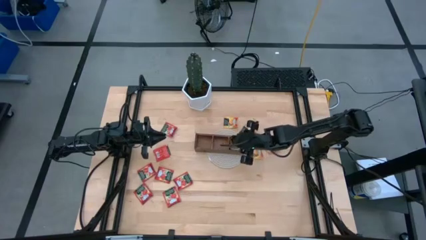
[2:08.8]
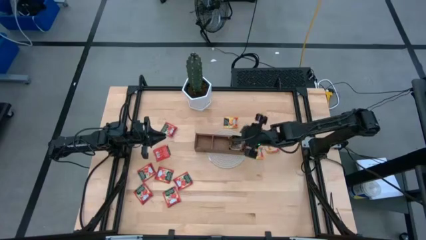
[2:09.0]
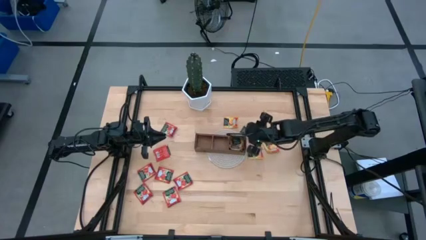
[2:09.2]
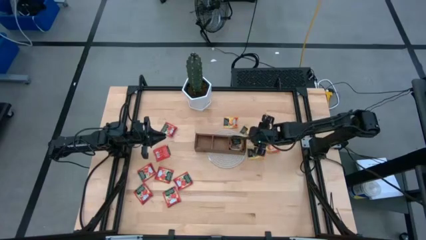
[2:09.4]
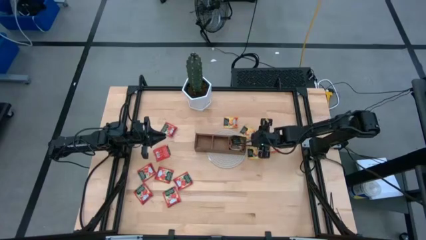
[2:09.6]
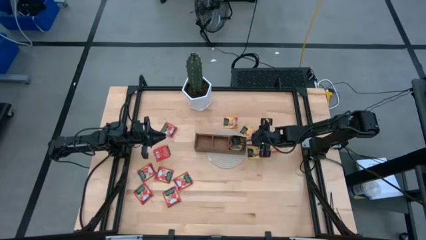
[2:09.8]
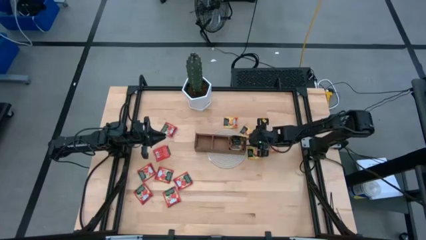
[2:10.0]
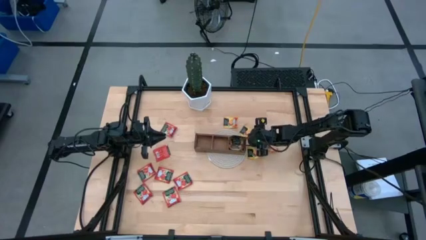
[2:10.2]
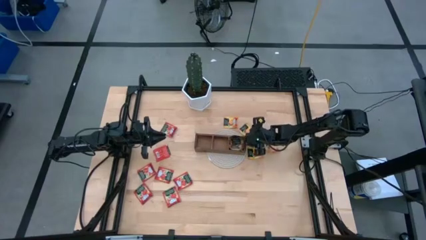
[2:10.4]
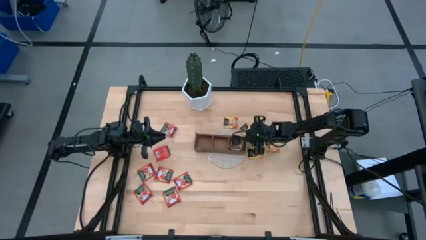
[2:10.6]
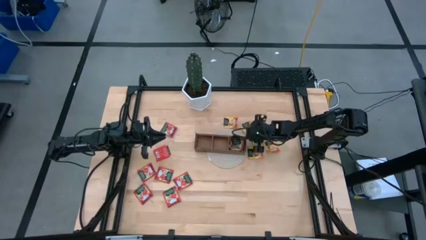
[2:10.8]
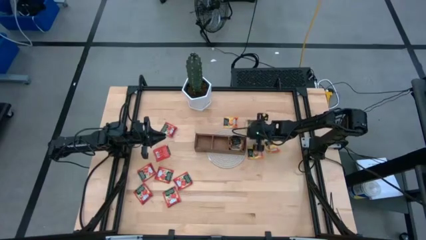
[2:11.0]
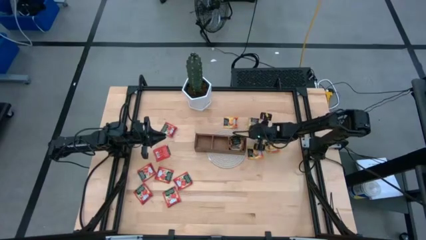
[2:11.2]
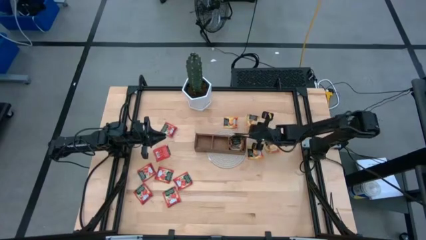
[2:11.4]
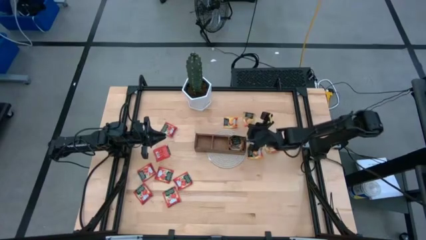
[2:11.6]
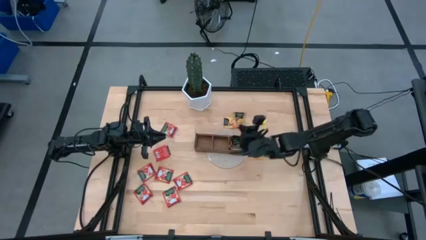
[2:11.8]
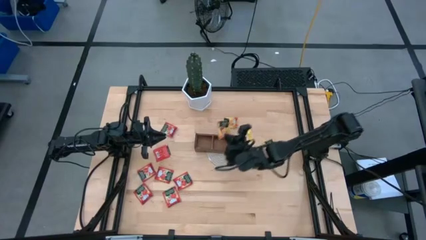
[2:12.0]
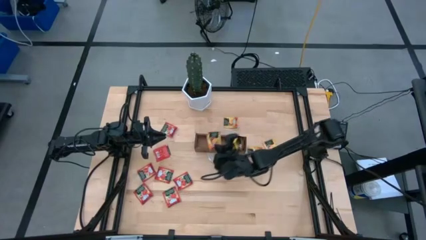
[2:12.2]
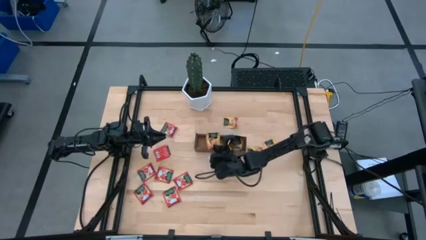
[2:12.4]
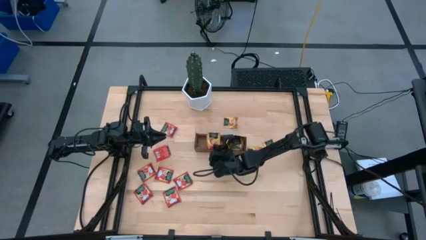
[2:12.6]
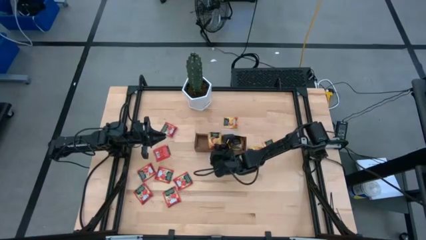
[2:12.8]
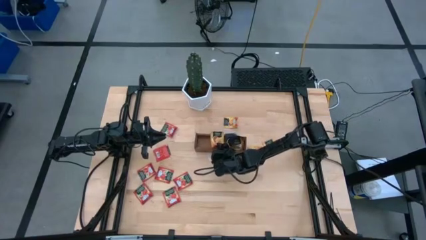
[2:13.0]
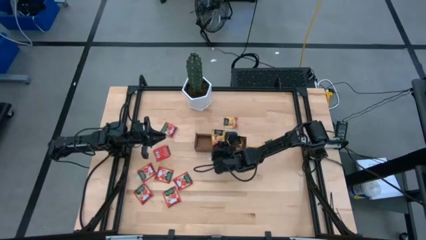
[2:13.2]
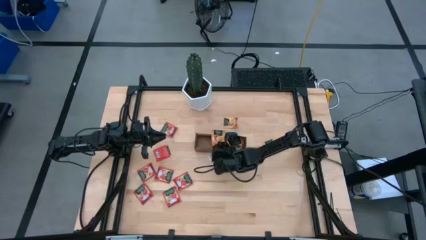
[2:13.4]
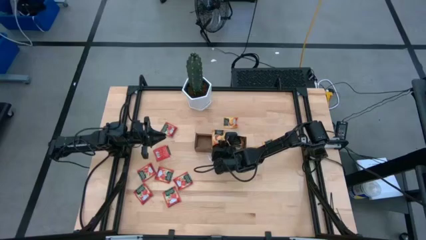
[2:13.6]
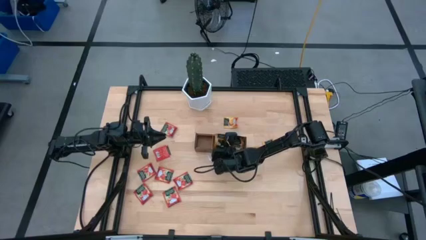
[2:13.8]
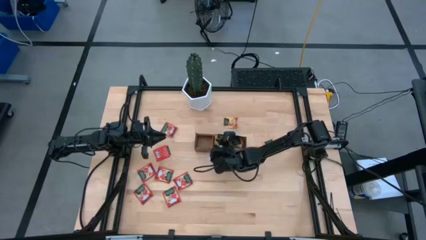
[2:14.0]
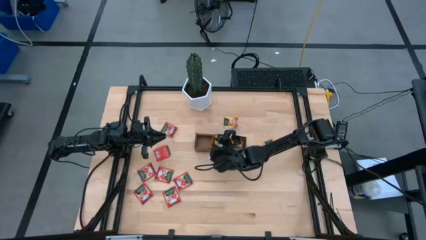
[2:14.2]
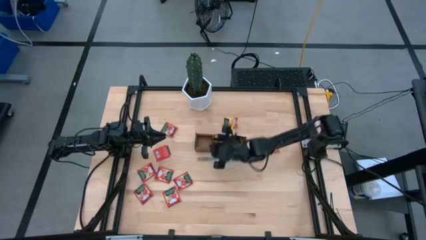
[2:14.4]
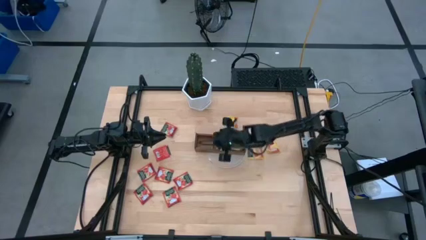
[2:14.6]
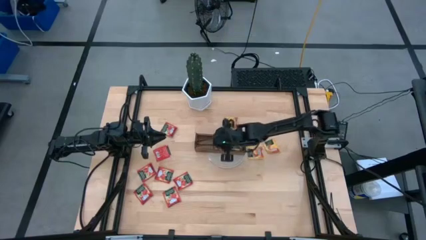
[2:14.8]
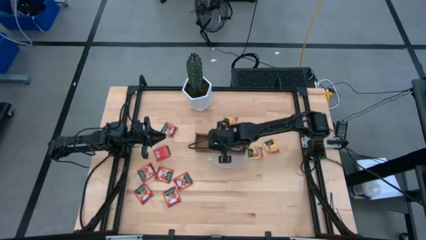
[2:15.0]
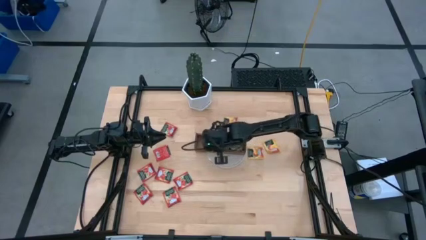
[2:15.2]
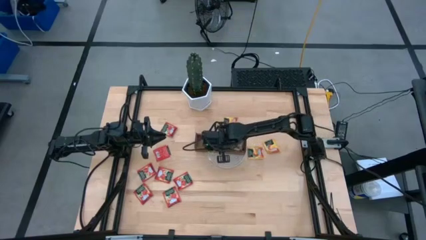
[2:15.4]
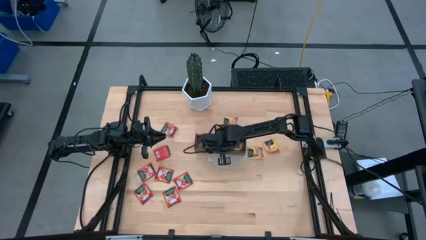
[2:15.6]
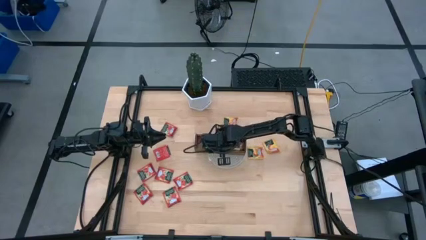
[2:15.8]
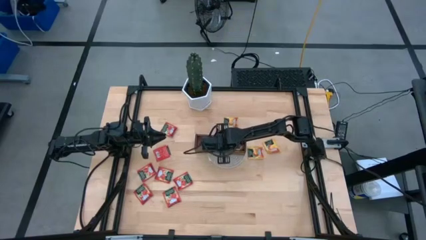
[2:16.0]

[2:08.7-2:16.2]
Task: Pick & Place Tea
Put the orange tea bag into the middle section of the wooden organizer

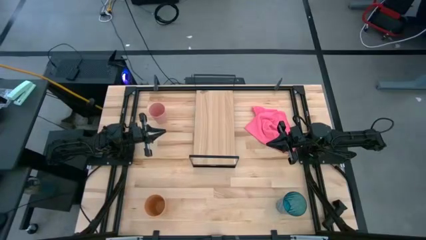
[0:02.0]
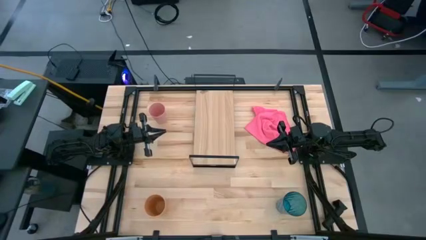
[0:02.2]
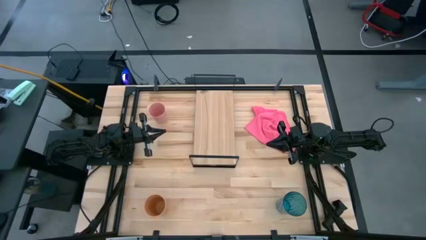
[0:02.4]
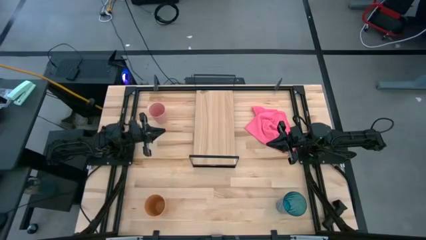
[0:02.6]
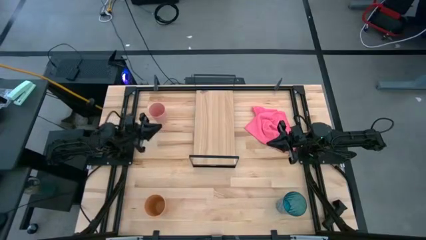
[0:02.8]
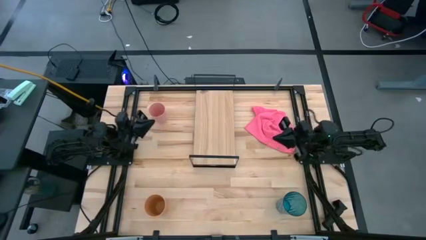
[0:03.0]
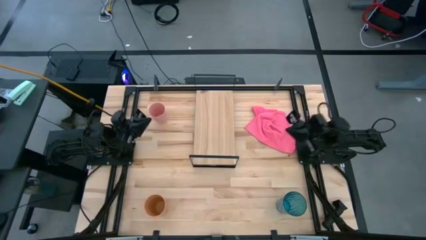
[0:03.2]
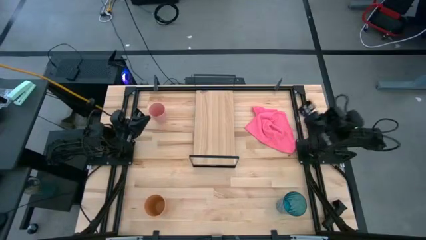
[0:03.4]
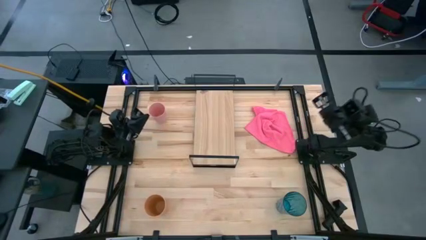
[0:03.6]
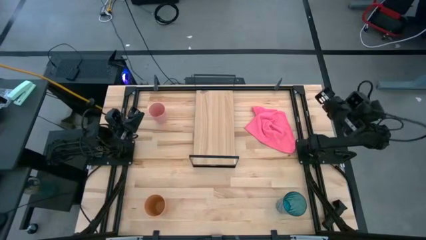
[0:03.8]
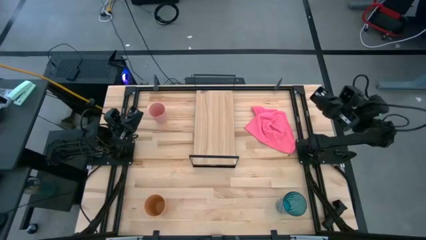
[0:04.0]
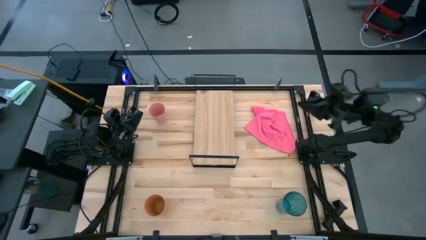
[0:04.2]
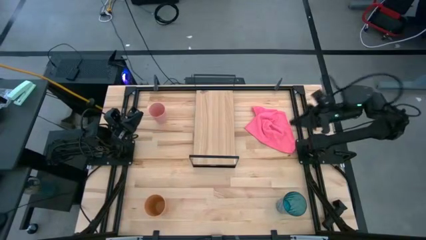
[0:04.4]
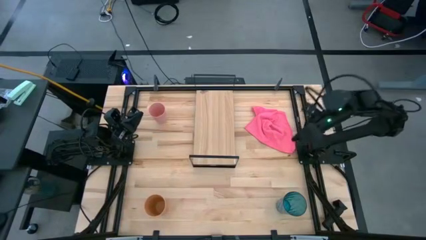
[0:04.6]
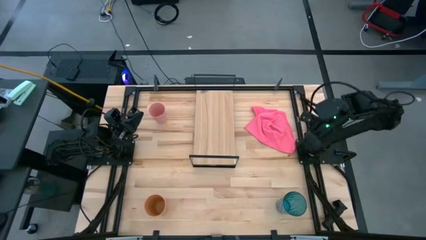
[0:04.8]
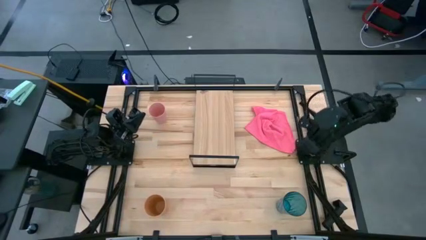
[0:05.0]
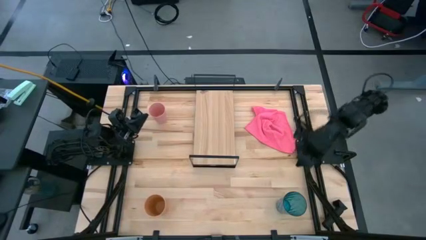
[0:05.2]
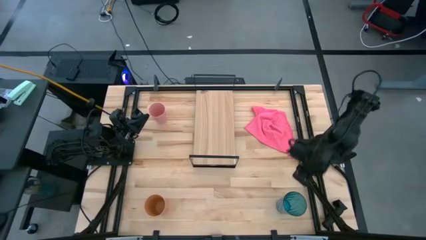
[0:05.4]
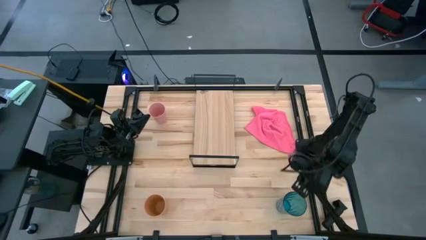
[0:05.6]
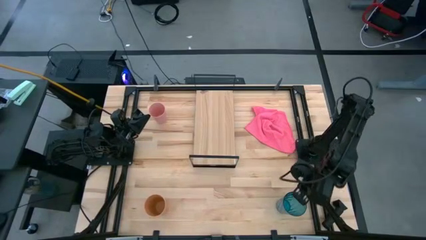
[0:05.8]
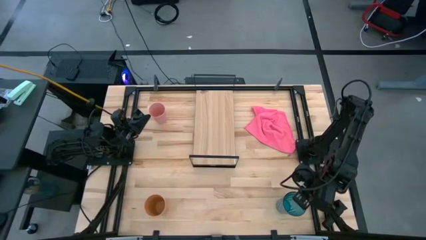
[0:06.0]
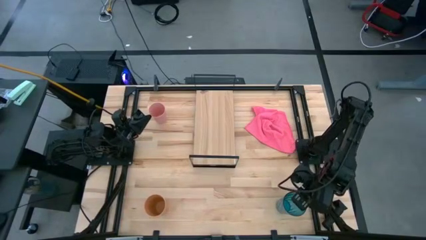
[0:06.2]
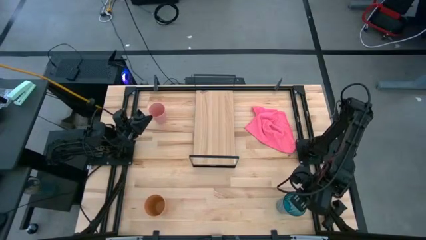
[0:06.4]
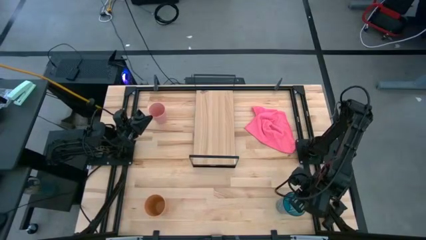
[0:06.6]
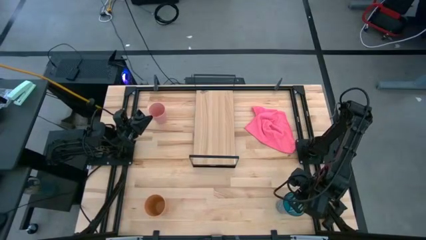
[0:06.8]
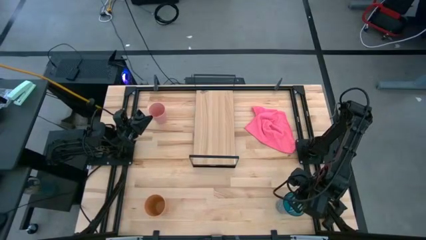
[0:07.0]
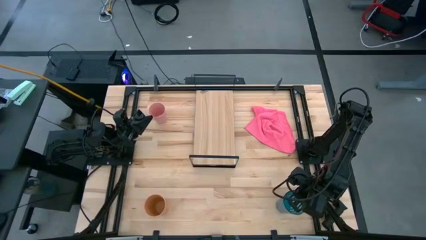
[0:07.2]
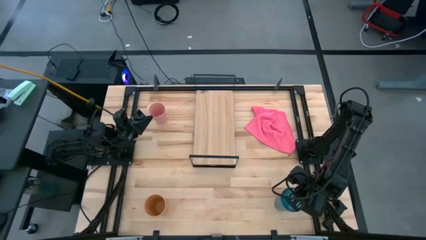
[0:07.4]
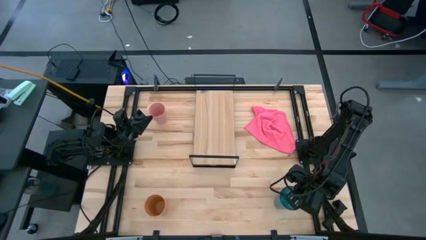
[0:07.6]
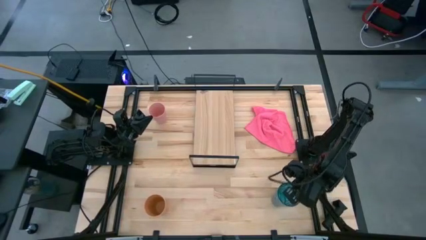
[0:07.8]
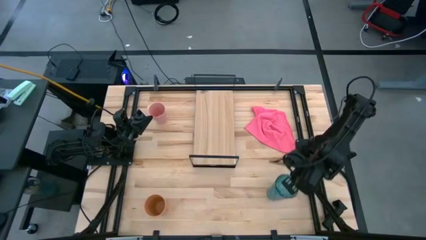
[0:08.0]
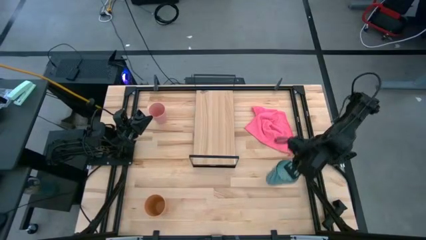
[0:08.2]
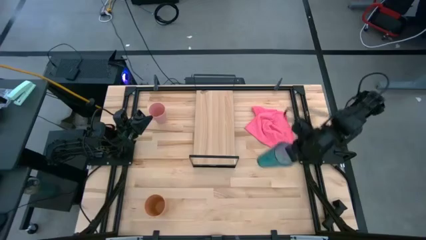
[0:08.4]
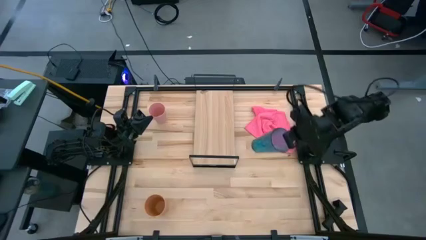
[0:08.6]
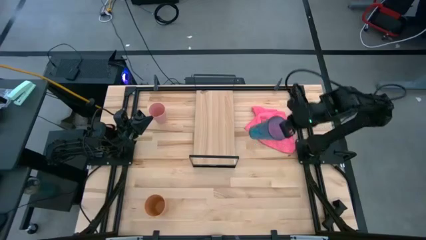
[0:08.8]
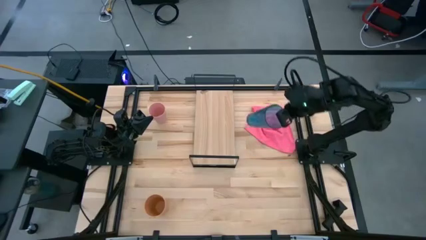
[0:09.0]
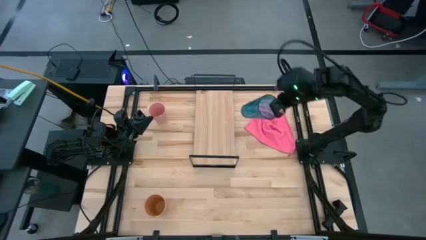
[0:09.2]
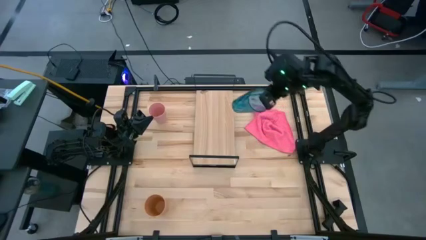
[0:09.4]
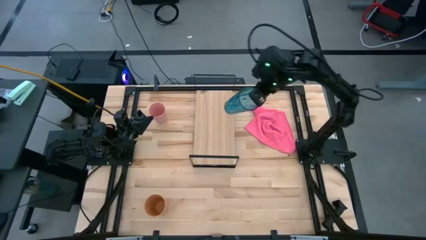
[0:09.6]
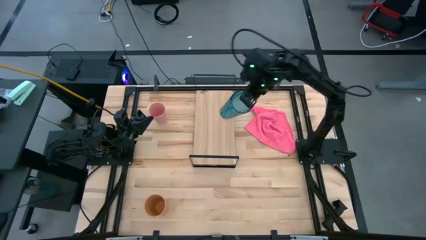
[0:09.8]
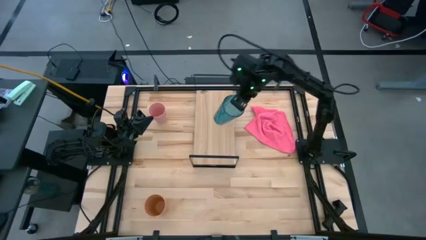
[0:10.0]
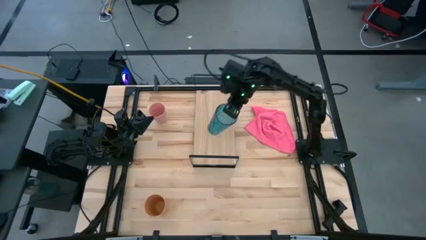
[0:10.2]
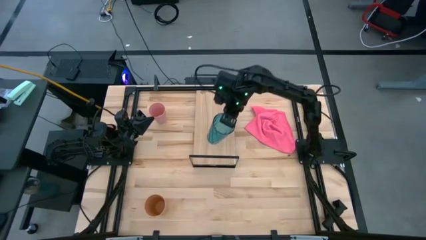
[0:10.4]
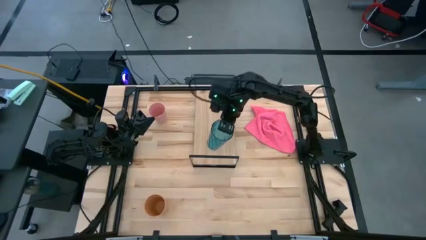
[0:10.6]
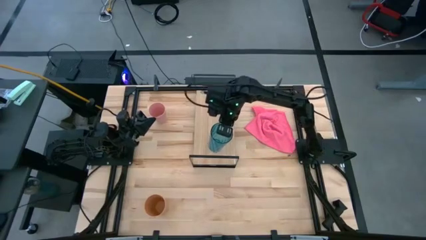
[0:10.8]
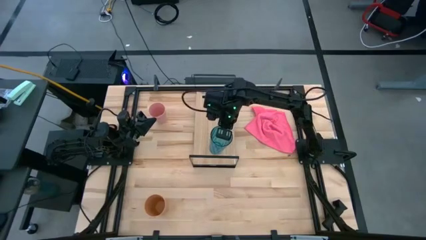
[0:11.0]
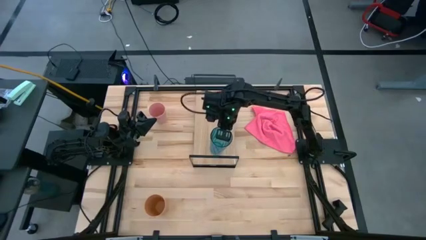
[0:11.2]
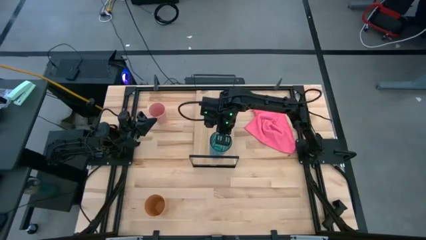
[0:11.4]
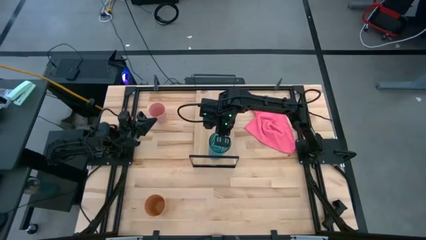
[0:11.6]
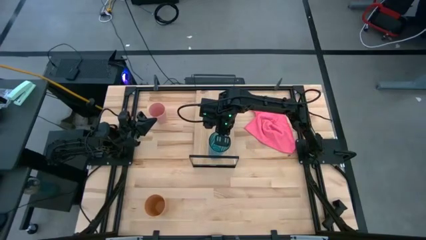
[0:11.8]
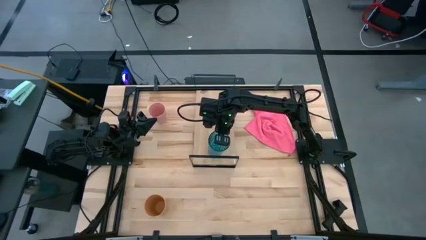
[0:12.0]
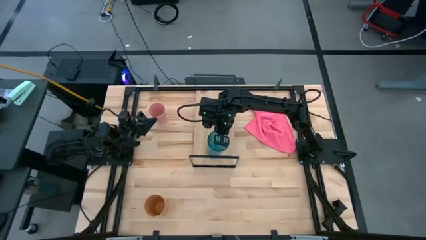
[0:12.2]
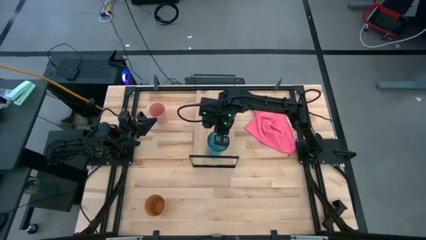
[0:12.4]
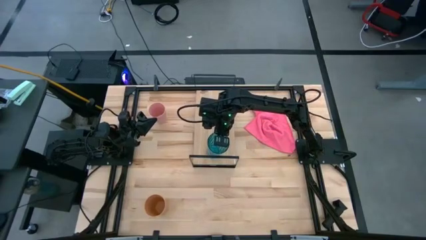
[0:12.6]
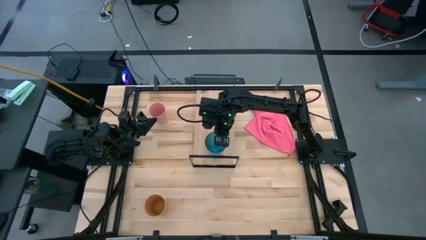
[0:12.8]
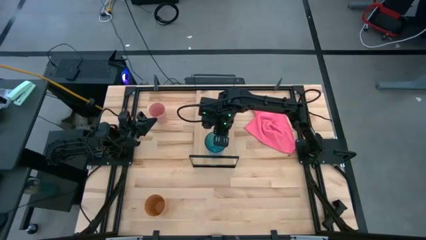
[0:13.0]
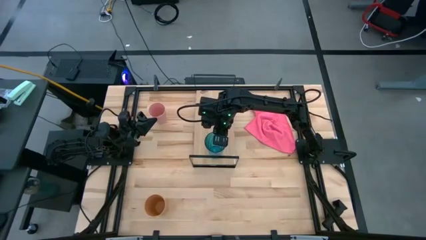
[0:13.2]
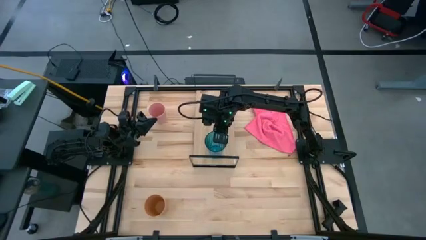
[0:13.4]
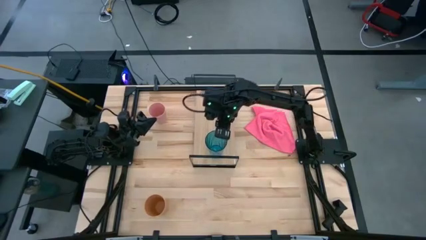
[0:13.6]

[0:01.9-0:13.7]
Task: Stack small to large cups/mugs on shelf
Put the blue cup on the shelf
